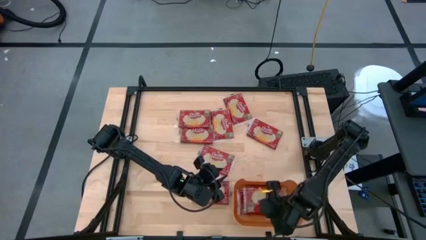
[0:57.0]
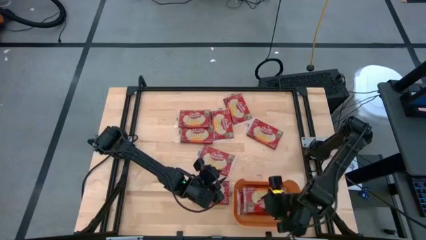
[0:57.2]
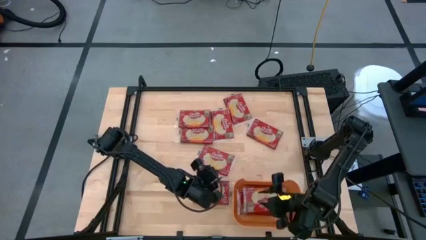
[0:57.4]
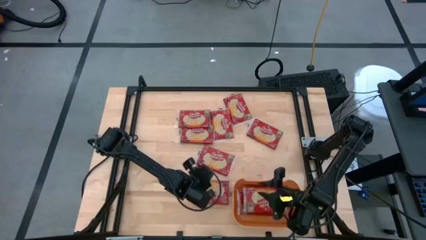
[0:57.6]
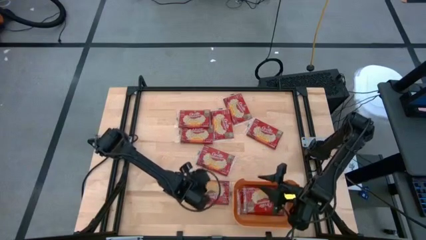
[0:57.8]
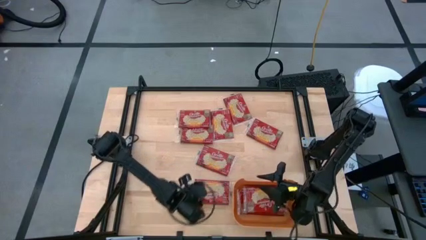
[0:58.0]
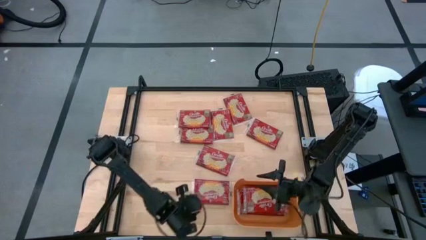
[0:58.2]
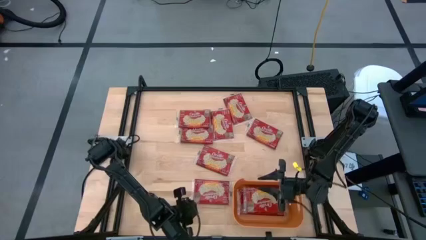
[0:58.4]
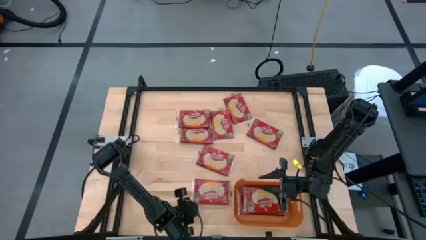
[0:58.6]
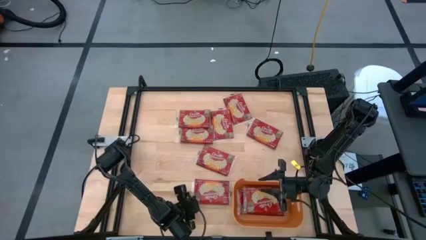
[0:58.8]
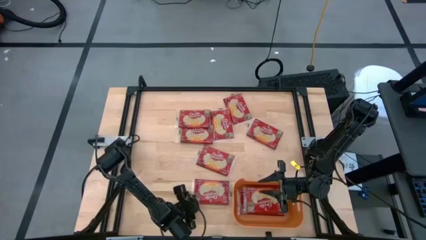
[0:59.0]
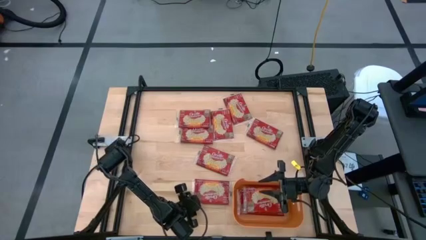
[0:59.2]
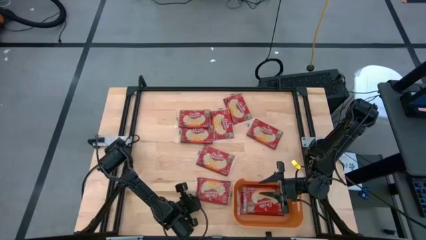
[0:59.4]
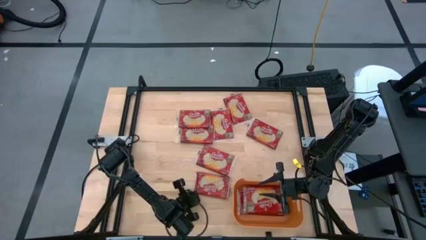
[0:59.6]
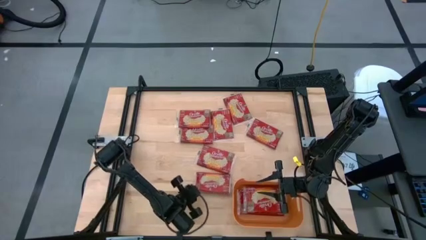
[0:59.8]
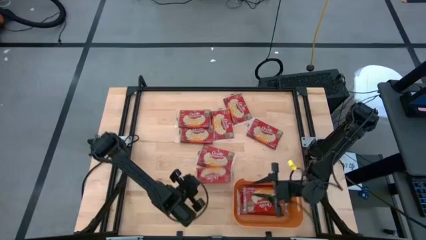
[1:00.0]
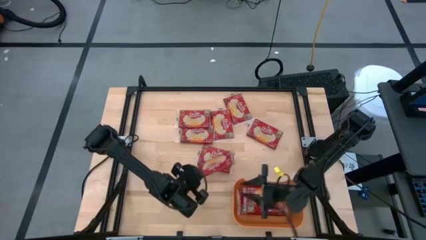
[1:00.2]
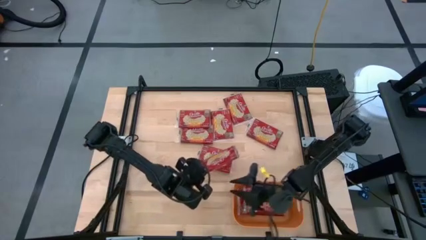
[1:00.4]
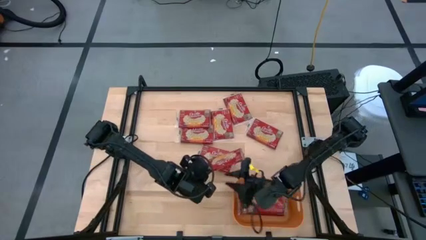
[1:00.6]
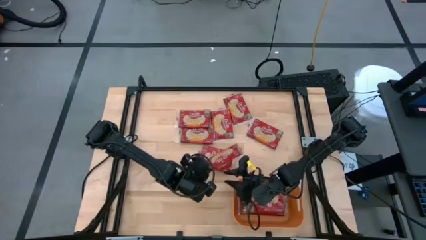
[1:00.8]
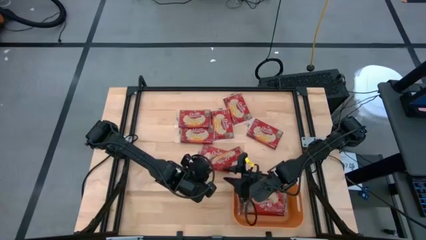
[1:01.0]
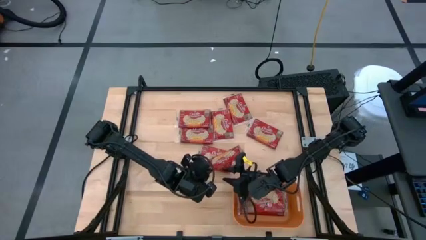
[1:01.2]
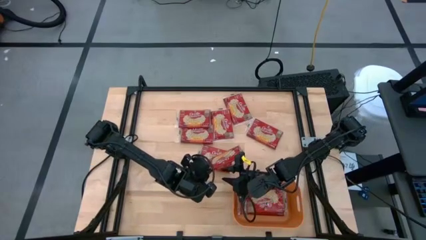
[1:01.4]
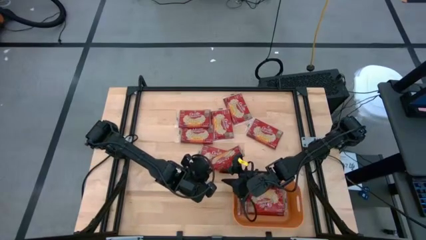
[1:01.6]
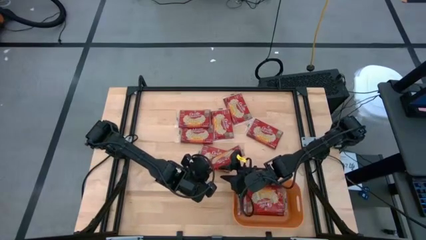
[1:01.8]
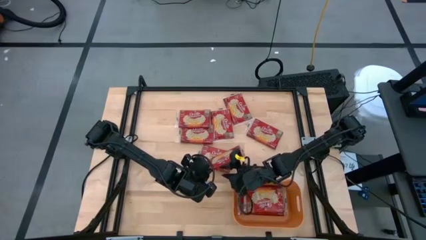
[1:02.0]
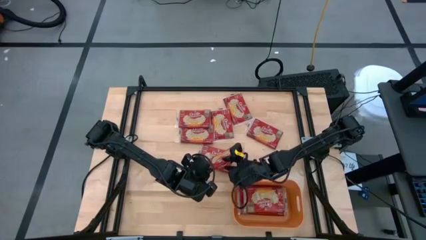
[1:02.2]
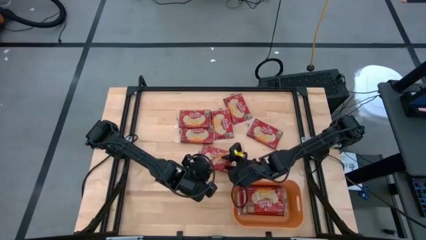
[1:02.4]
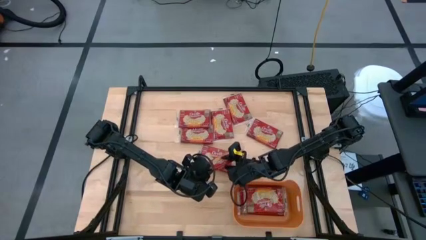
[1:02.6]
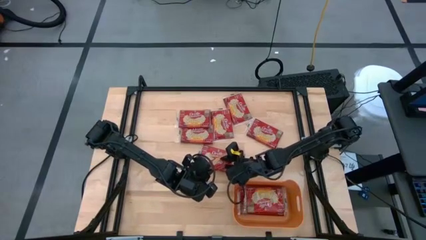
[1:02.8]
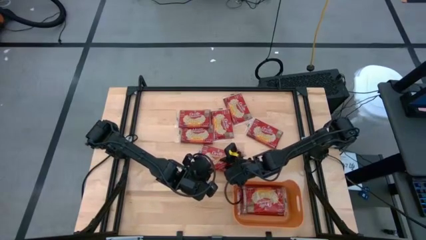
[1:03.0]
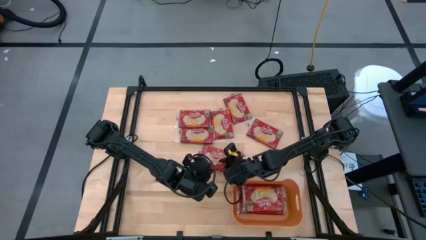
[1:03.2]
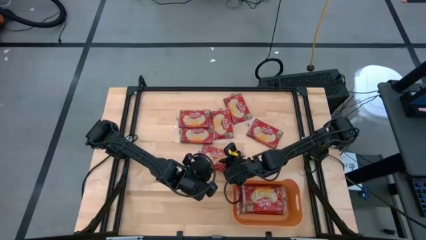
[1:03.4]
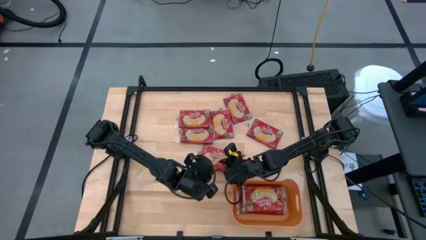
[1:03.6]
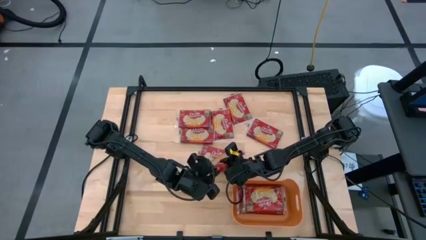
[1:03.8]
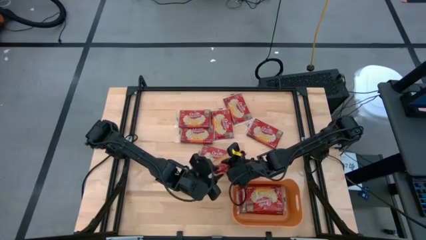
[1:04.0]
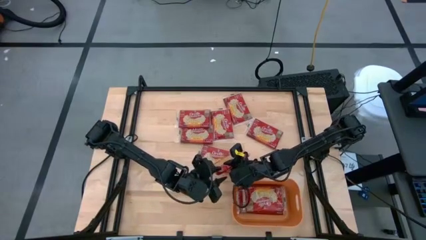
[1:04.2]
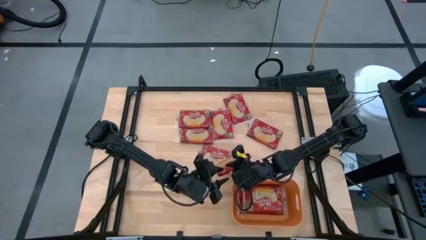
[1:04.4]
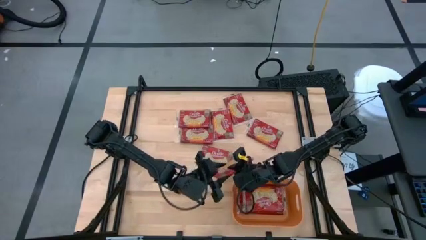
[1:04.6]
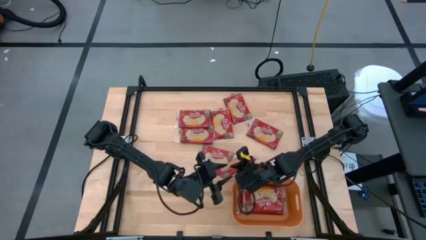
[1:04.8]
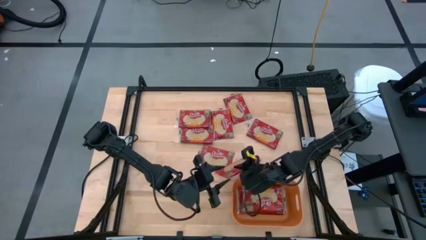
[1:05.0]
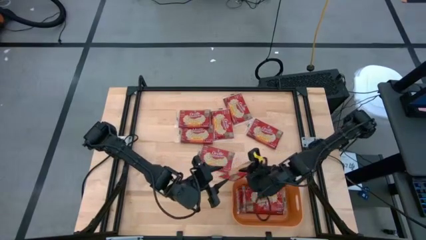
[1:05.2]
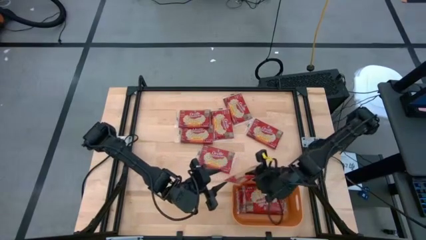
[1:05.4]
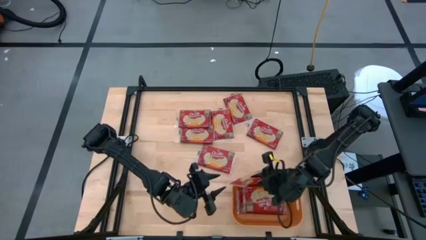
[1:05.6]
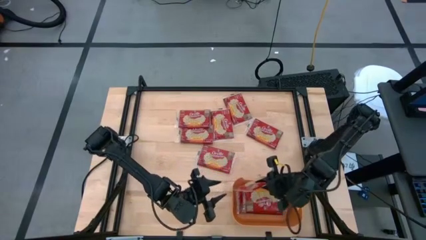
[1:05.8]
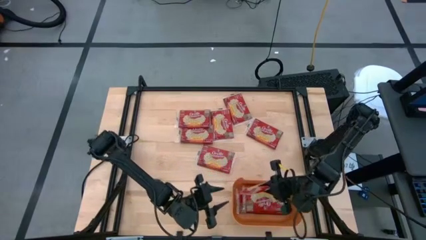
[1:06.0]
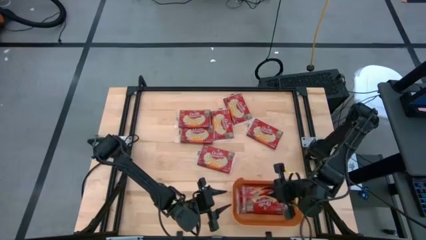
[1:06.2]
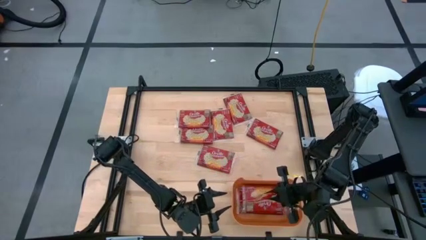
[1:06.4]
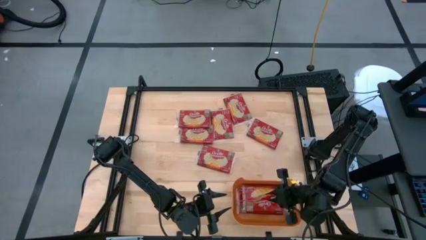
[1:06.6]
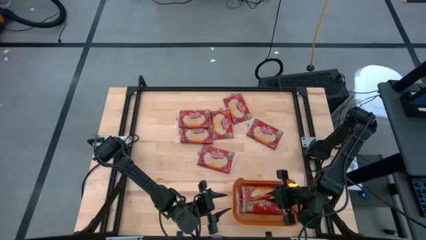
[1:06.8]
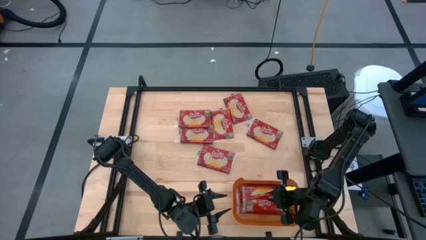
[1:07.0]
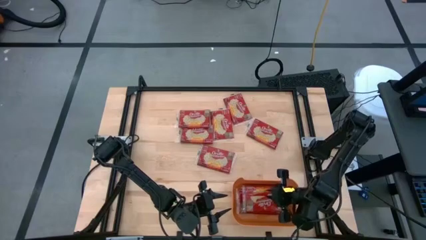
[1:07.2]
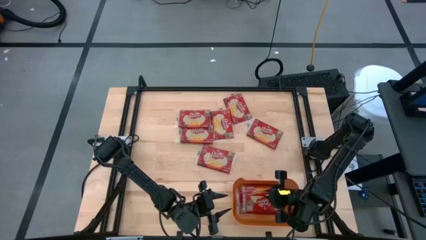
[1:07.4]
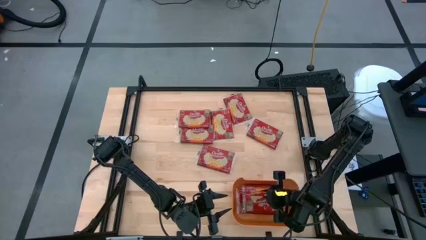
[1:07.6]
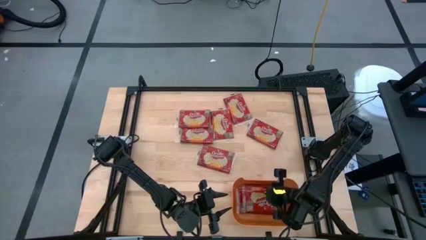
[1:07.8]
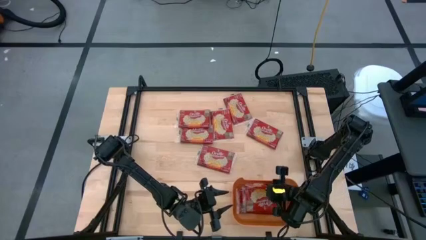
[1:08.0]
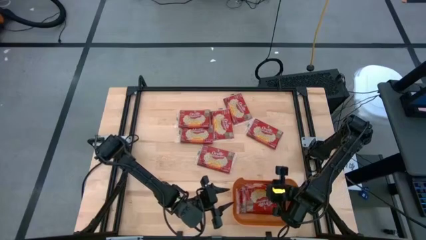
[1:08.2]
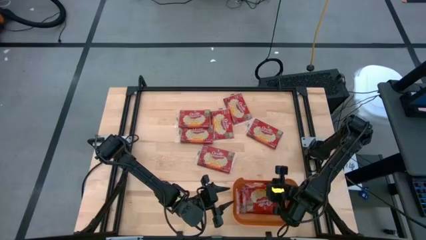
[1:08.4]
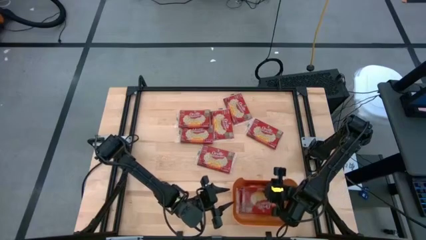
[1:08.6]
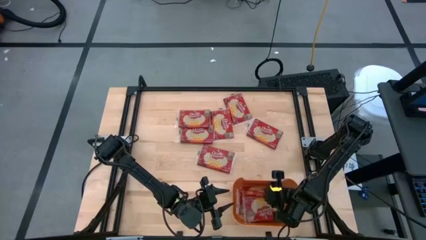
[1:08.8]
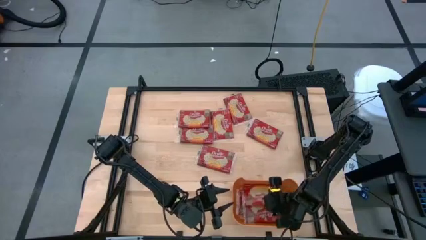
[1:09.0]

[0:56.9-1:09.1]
Task: Sort popcorn bags into baskets
Put the red popcorn bag into the orange bin
